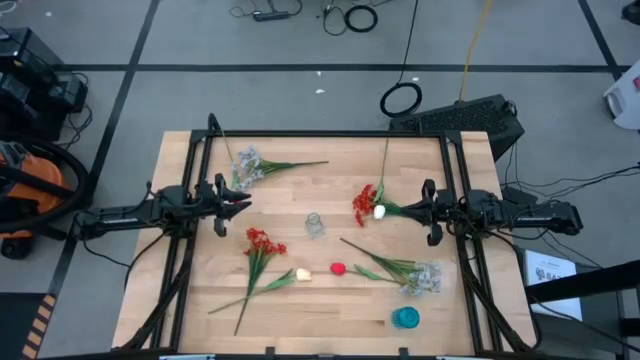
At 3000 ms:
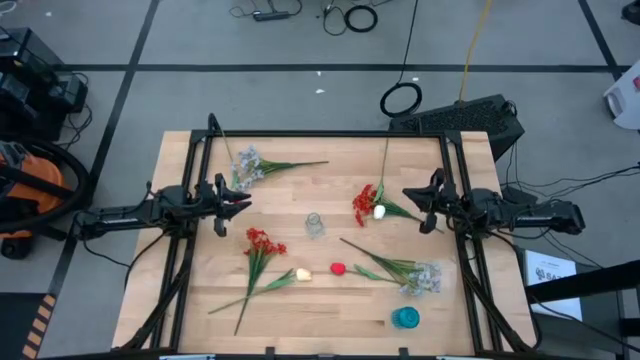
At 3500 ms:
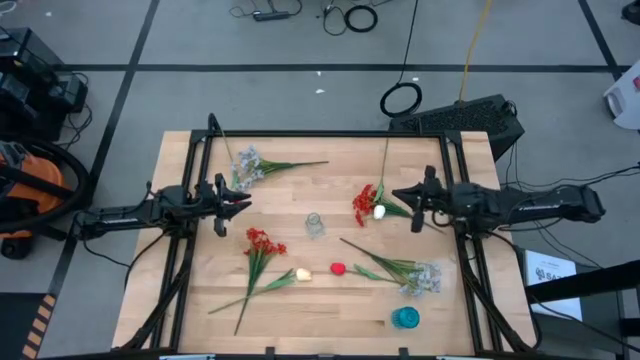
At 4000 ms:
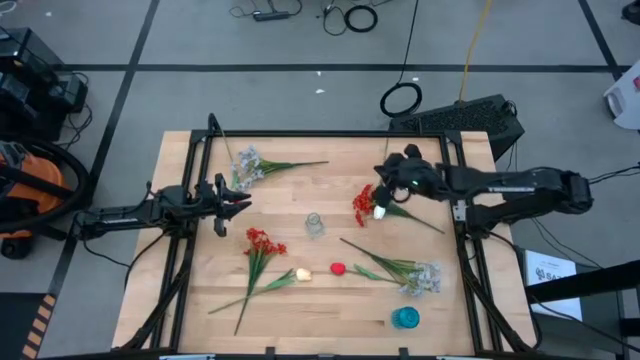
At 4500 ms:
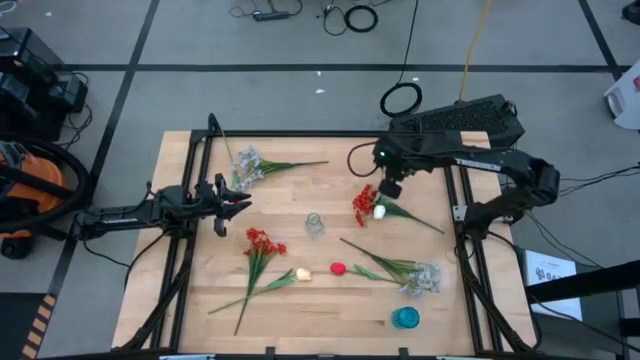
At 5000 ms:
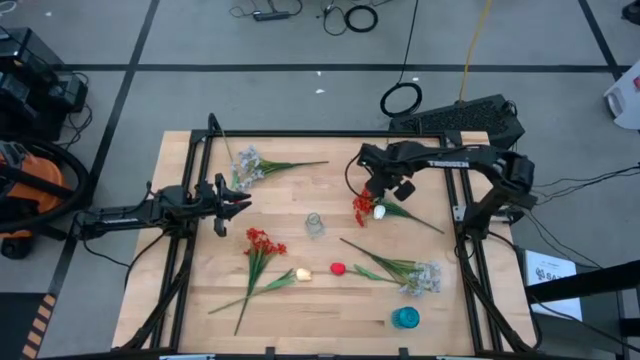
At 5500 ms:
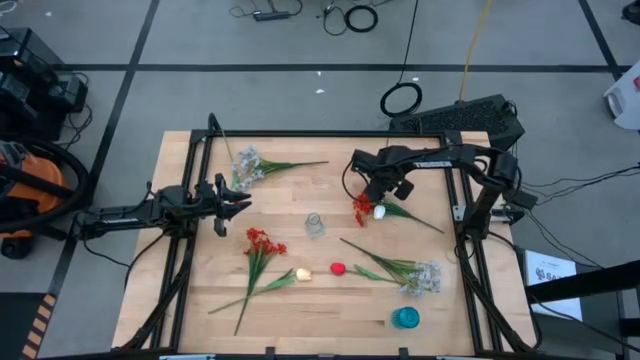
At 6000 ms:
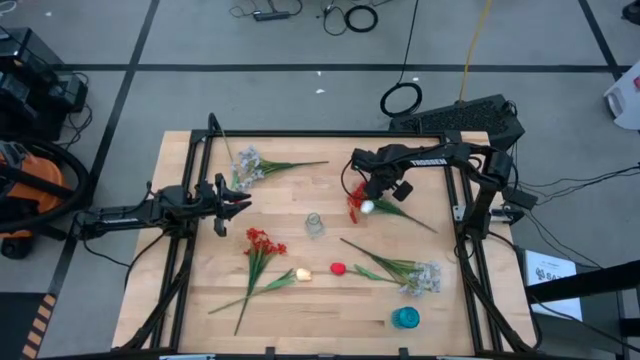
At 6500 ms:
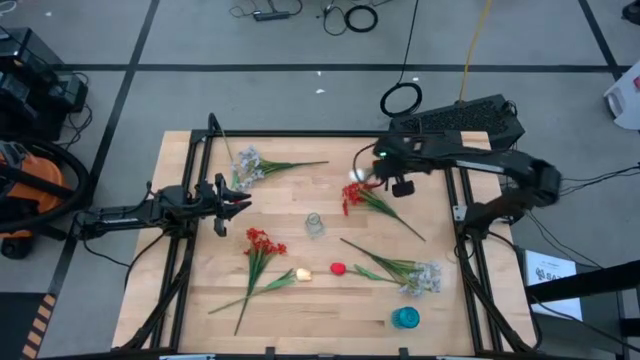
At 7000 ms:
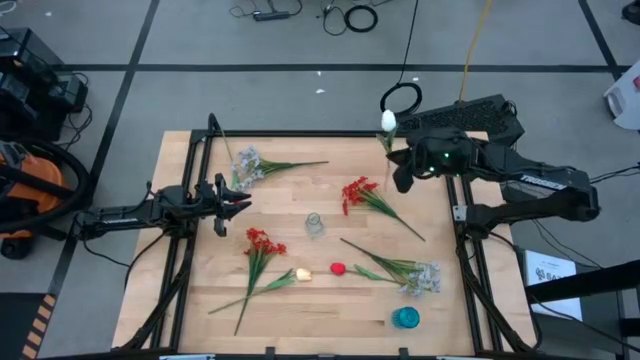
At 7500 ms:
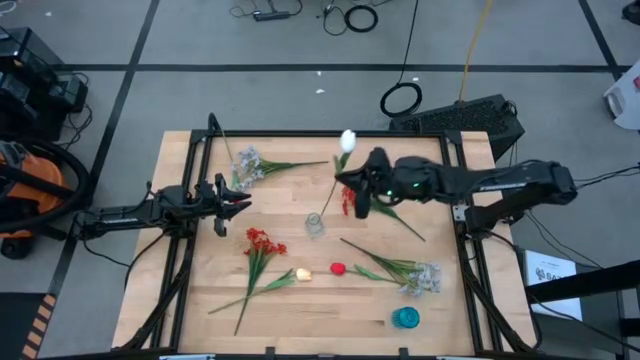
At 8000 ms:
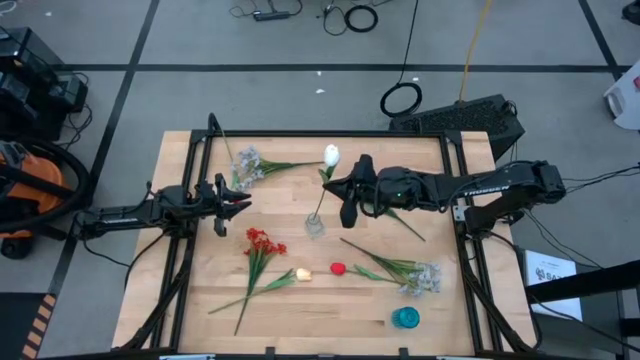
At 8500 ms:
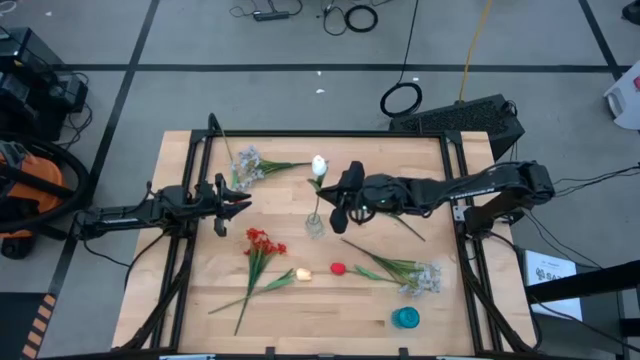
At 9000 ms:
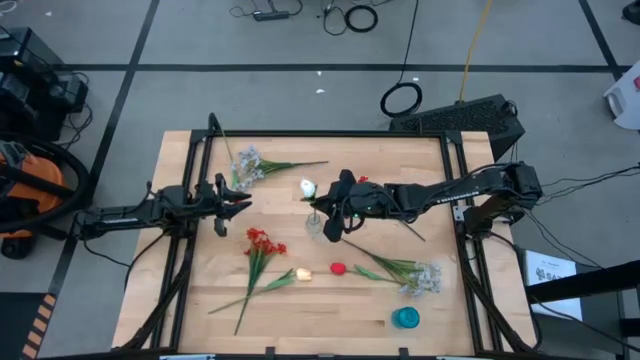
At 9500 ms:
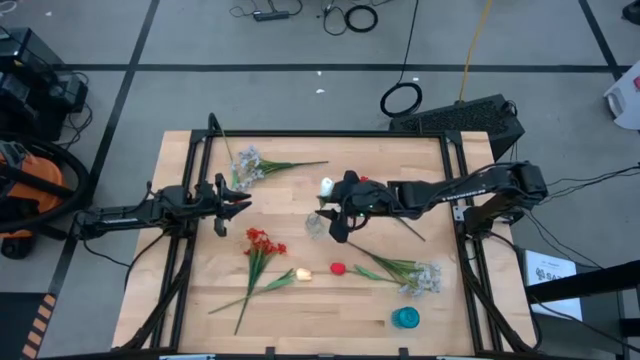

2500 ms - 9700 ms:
Task: Sort flowers into vase by color
Put the white tulip into the transparent vase

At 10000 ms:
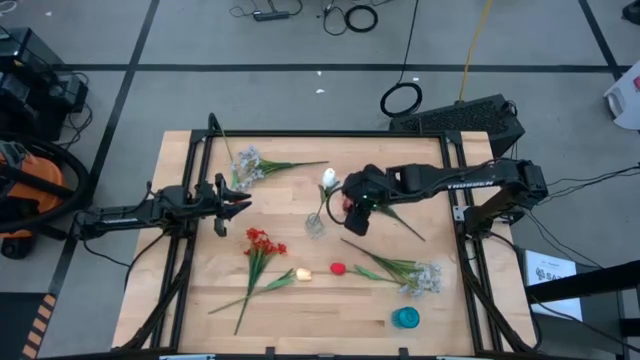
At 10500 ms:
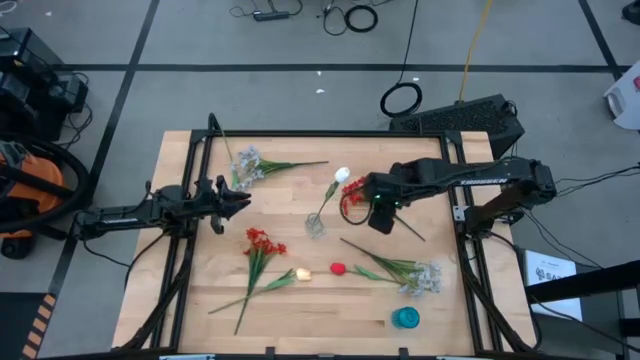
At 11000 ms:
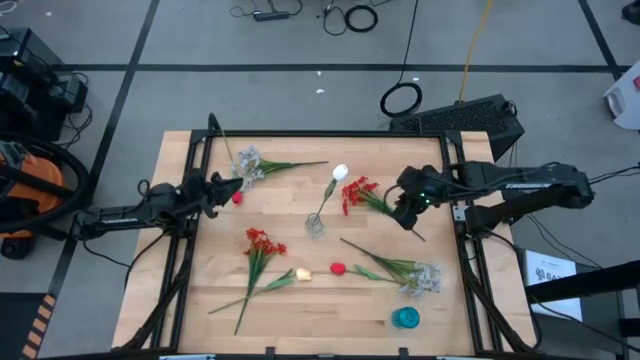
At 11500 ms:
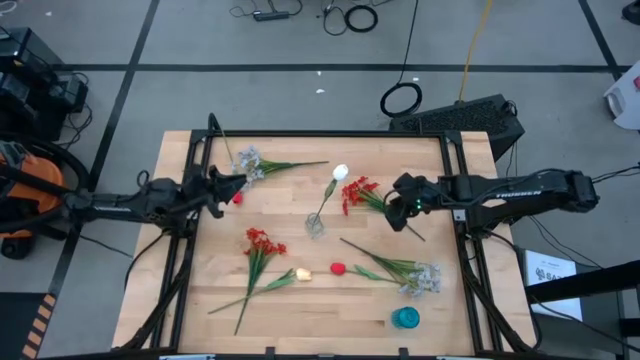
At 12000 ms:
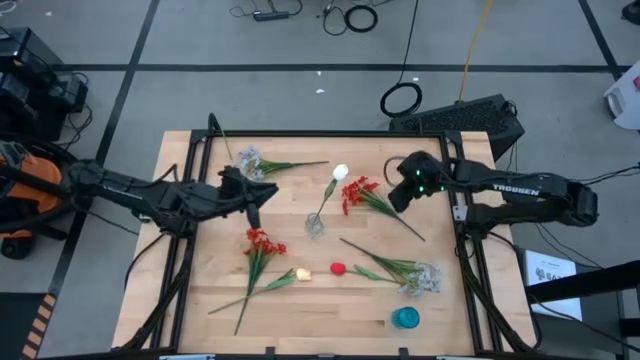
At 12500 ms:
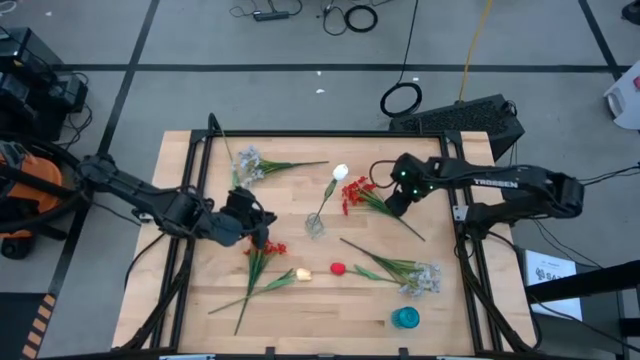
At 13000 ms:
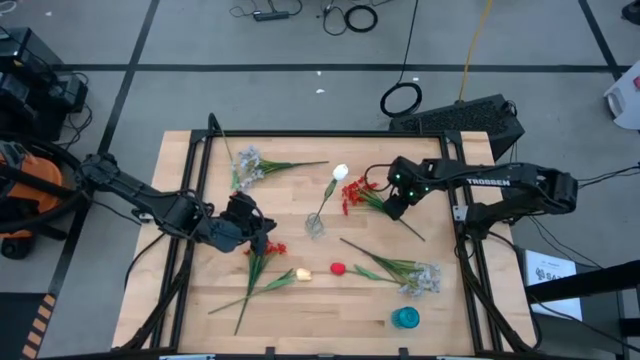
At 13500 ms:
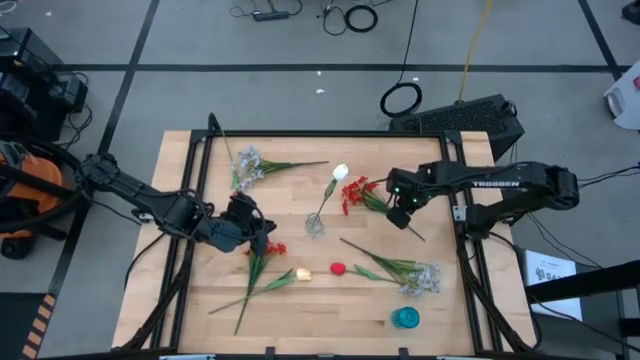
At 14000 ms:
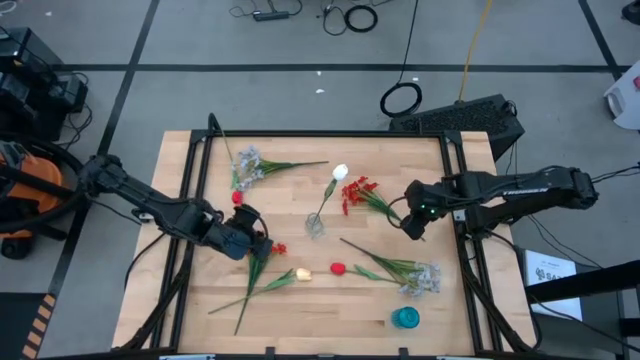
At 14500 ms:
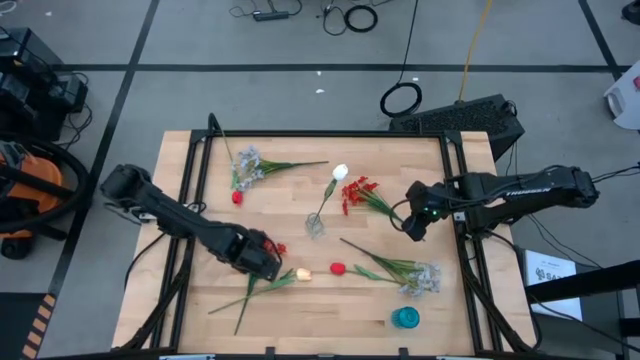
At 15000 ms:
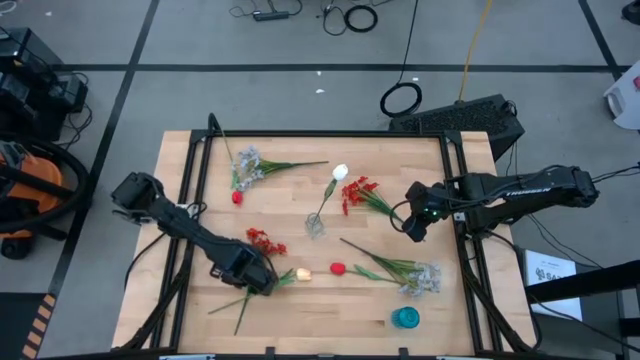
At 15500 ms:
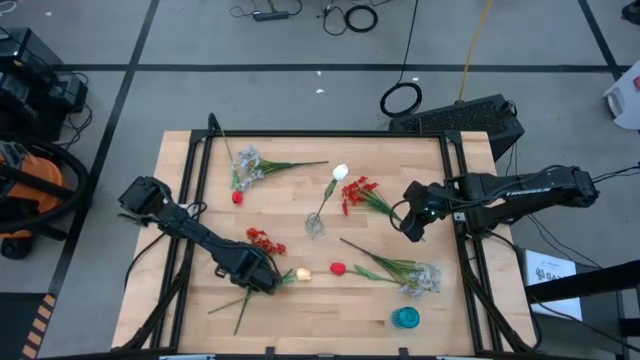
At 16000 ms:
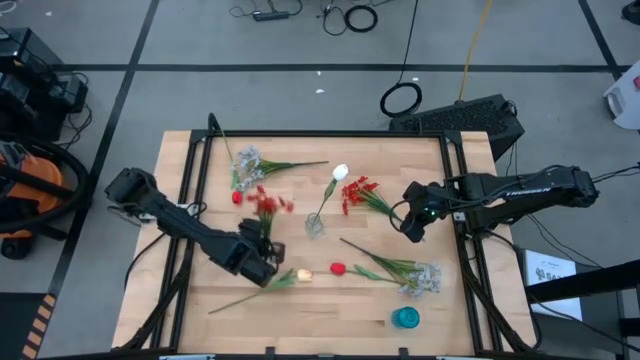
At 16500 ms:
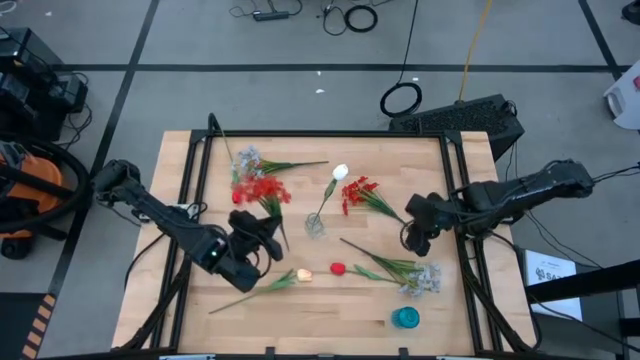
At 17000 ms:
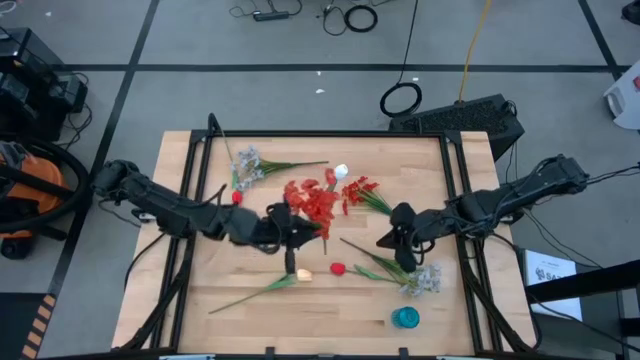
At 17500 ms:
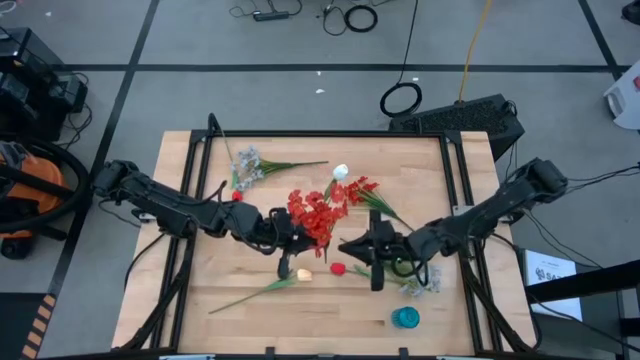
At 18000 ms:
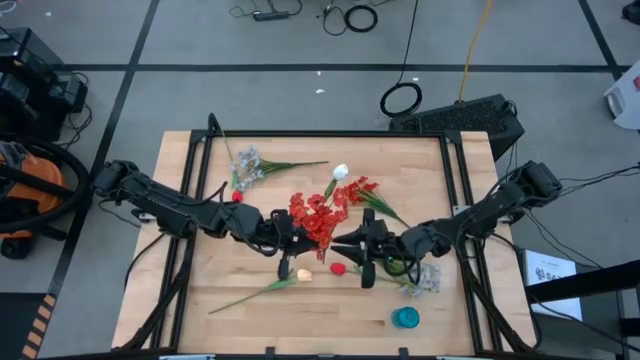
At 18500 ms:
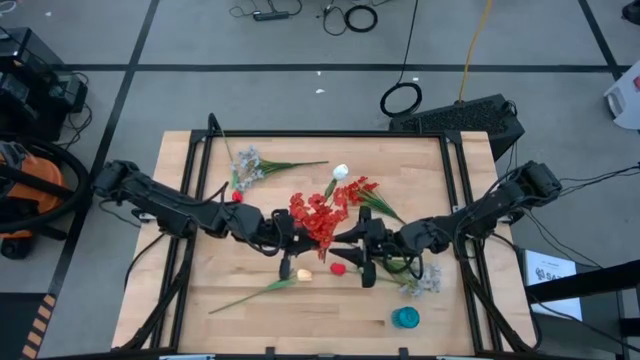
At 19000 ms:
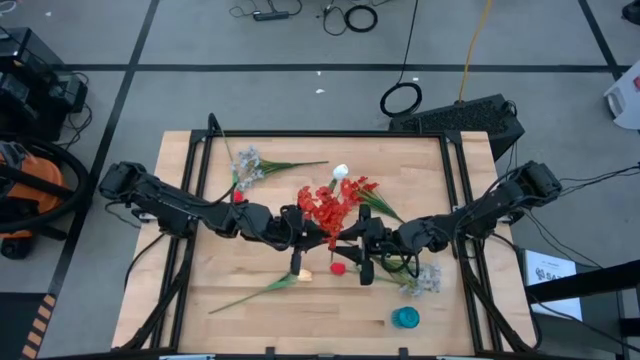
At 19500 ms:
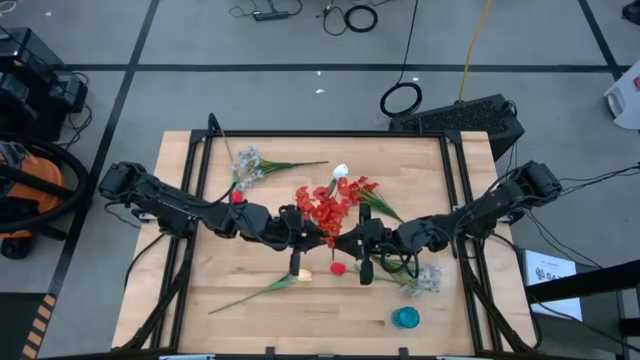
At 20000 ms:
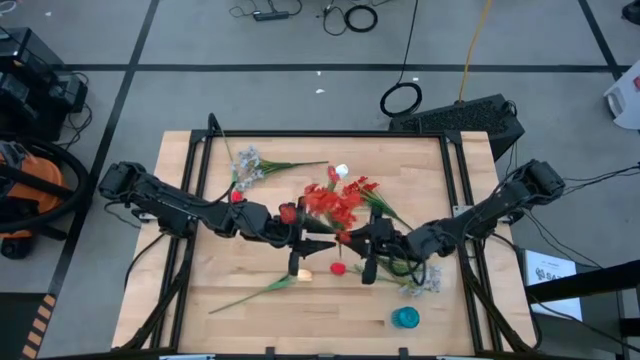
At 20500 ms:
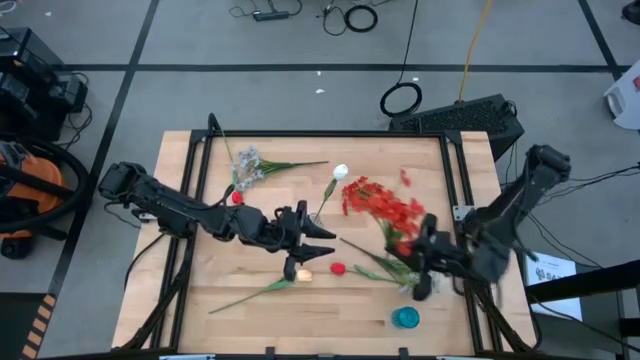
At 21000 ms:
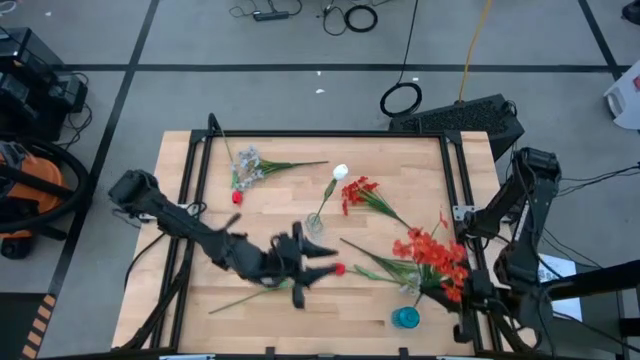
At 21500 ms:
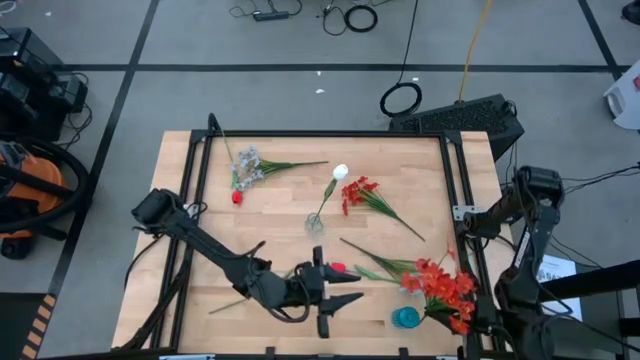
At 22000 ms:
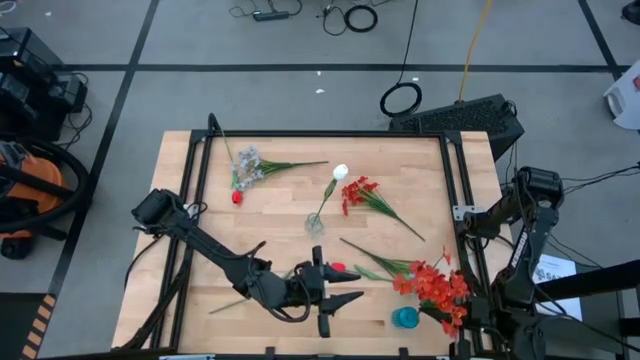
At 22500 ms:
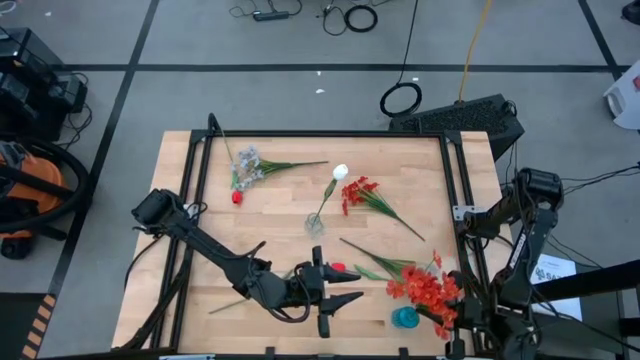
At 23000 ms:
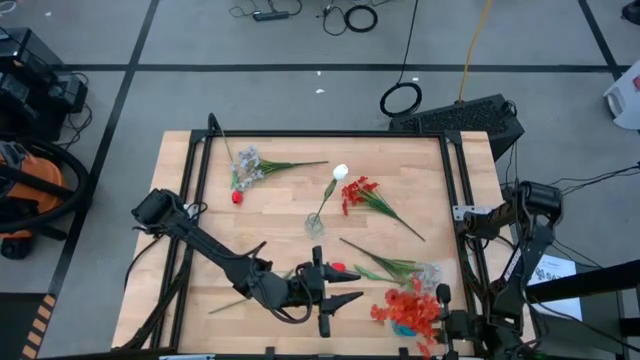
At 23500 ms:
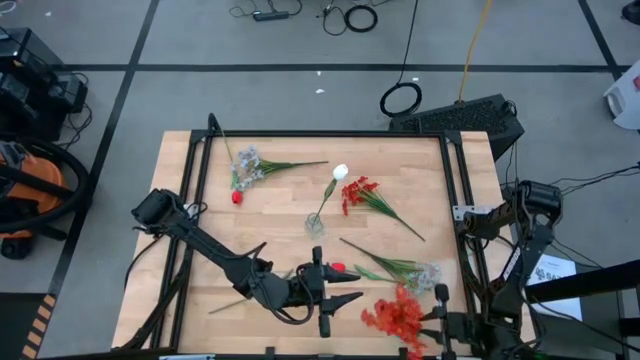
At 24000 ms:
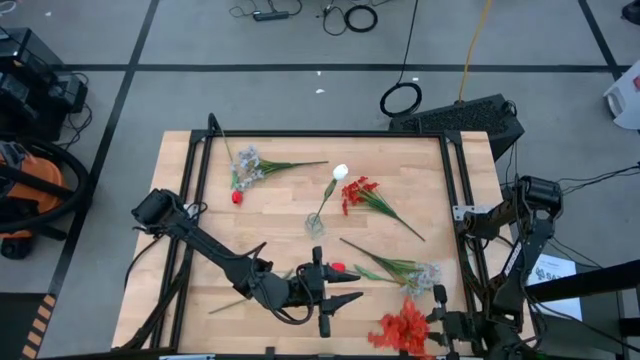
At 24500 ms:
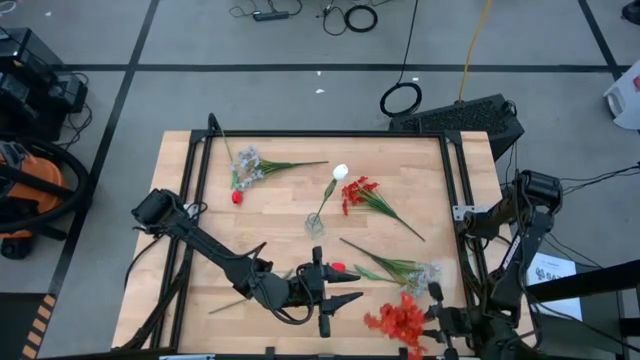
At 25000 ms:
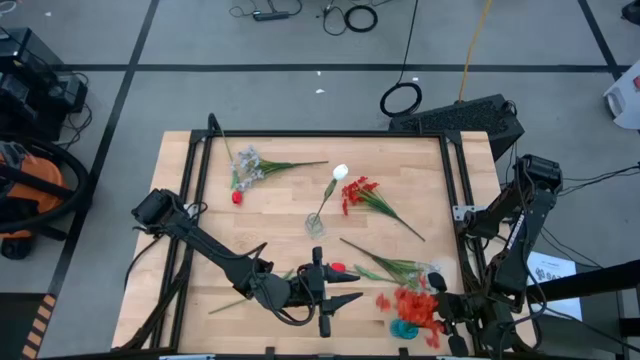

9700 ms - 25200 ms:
Put the bottom red flowers into the blue vase
